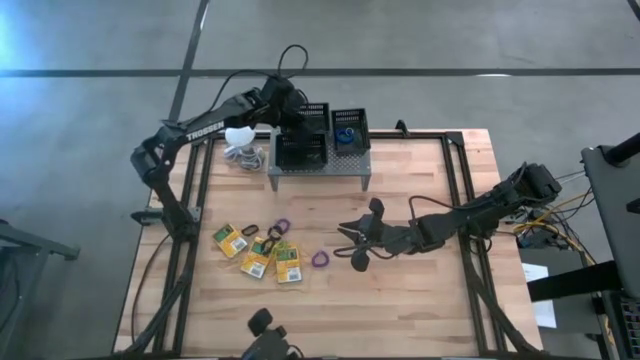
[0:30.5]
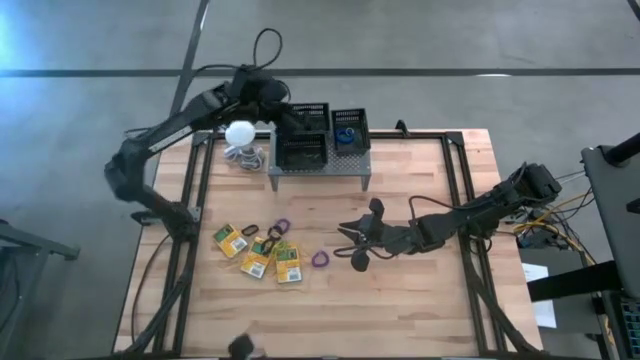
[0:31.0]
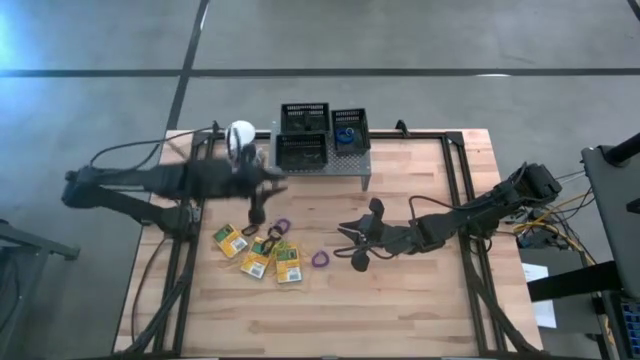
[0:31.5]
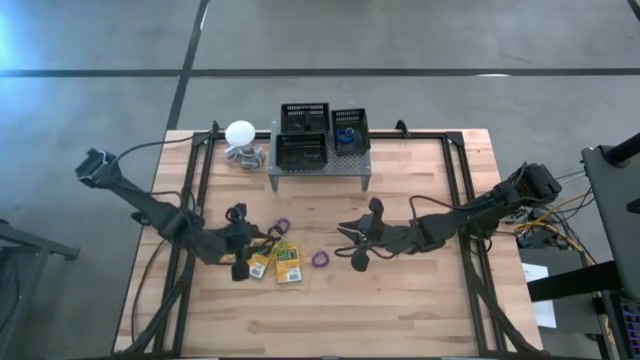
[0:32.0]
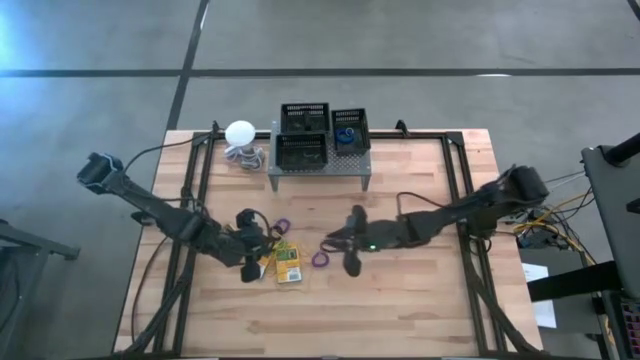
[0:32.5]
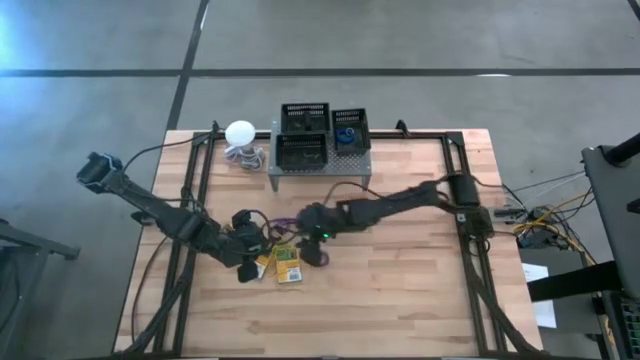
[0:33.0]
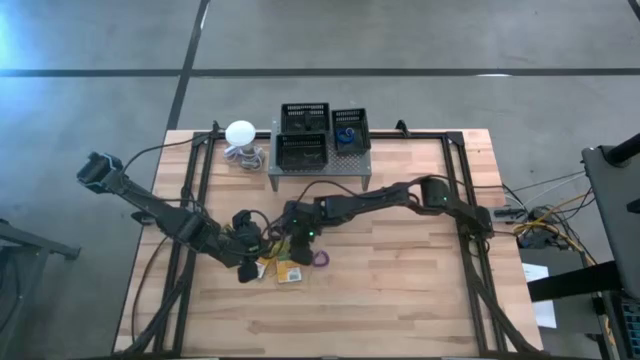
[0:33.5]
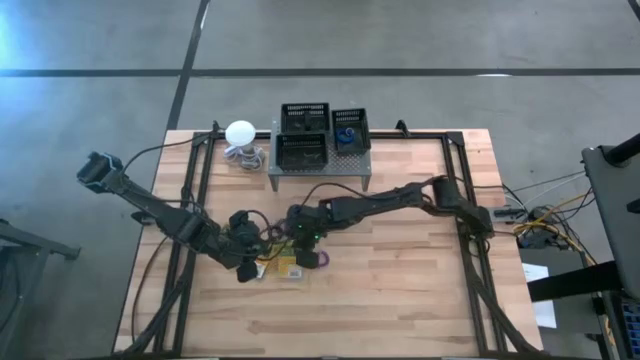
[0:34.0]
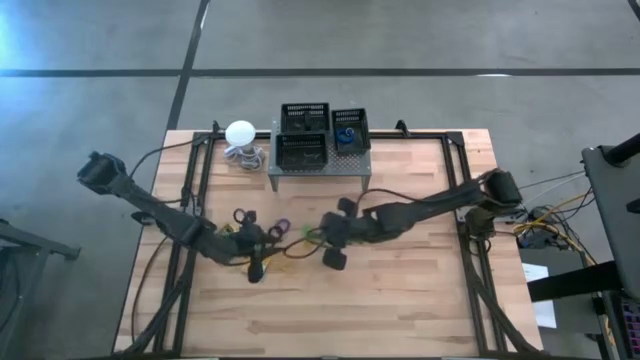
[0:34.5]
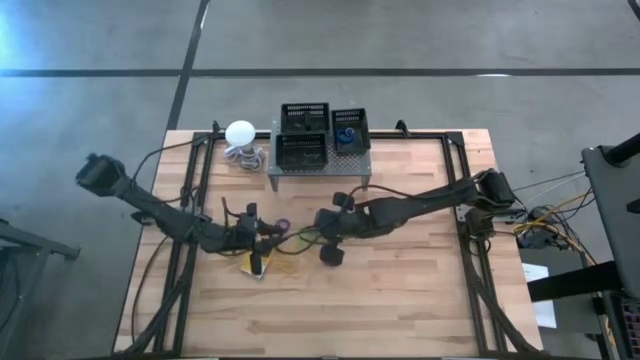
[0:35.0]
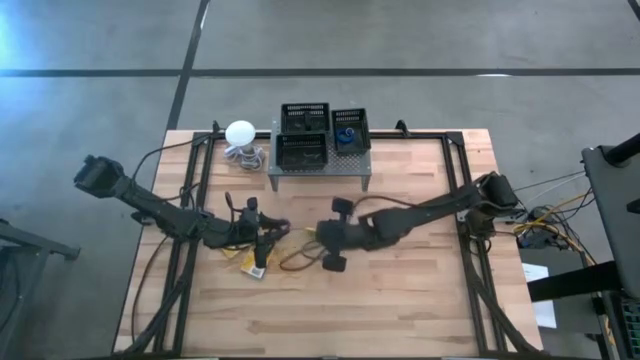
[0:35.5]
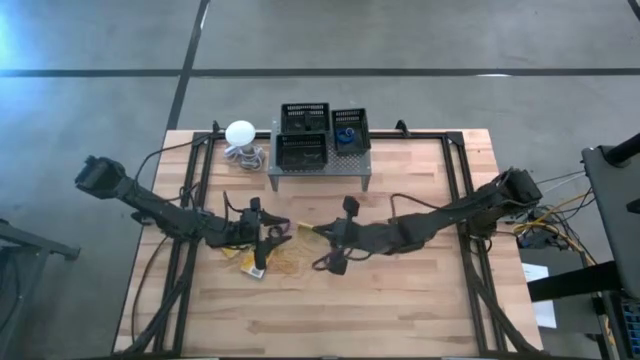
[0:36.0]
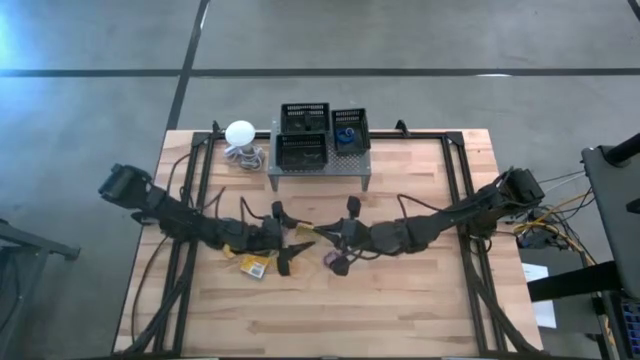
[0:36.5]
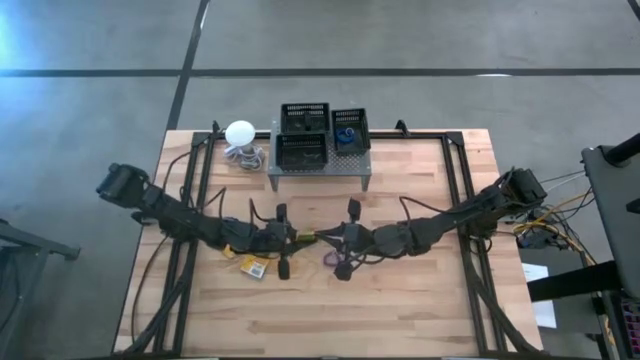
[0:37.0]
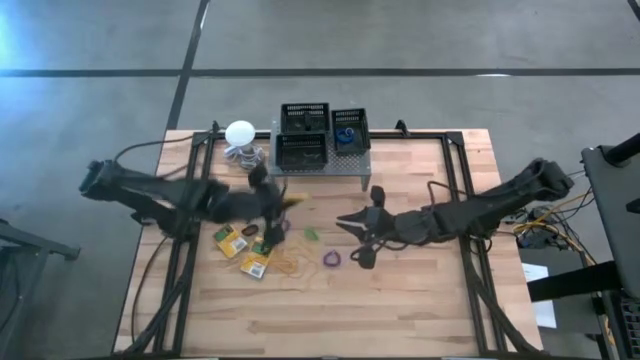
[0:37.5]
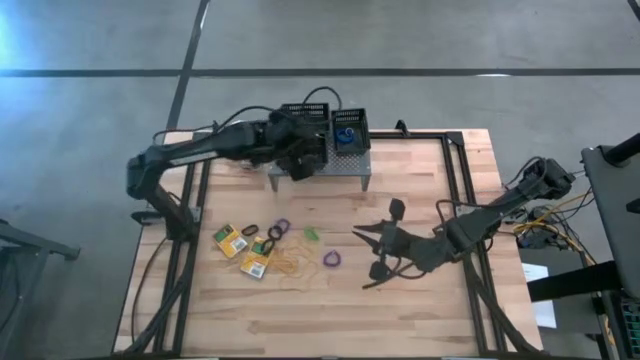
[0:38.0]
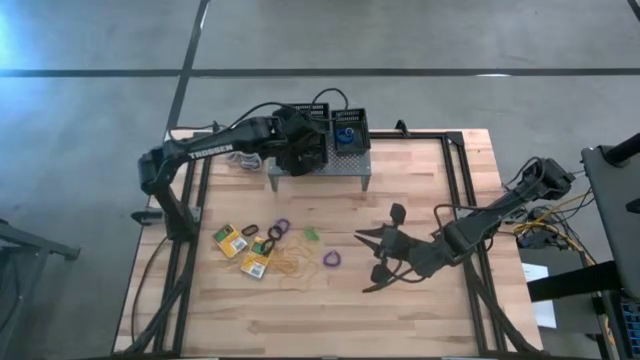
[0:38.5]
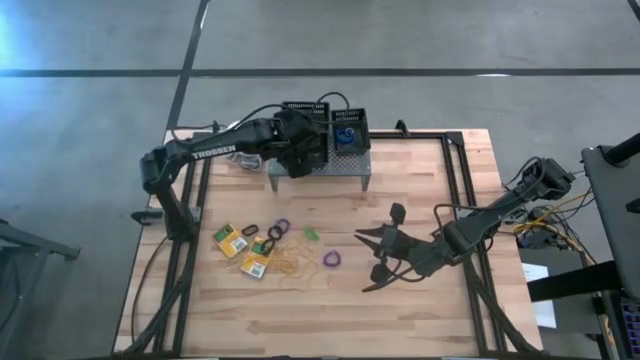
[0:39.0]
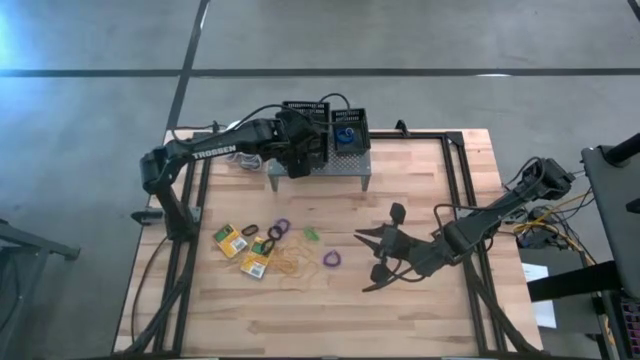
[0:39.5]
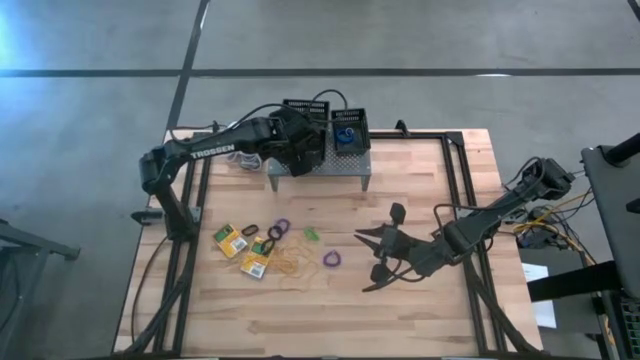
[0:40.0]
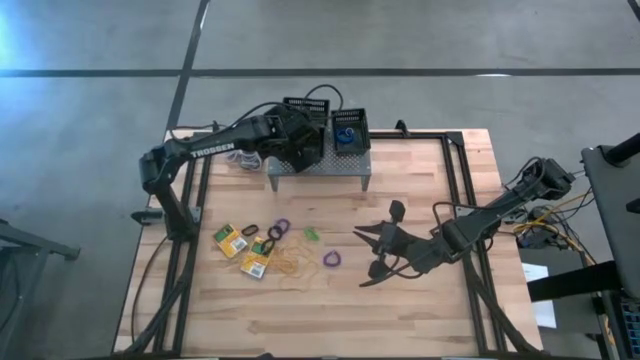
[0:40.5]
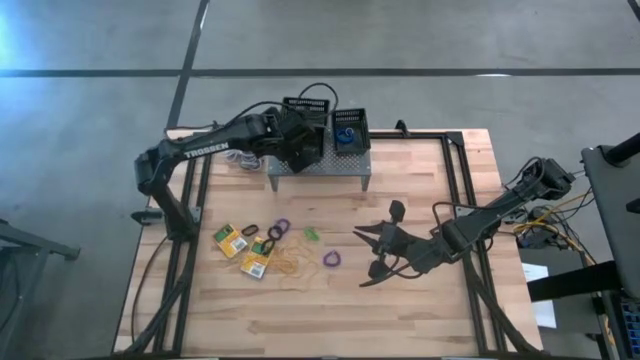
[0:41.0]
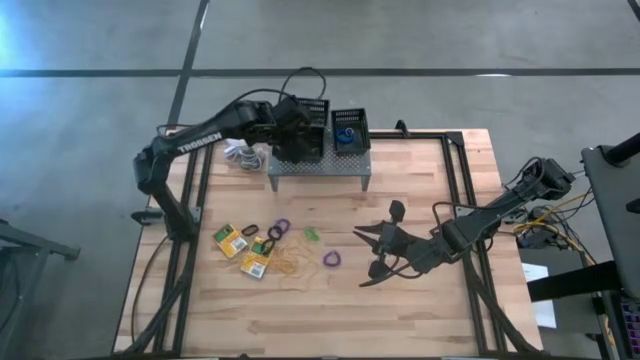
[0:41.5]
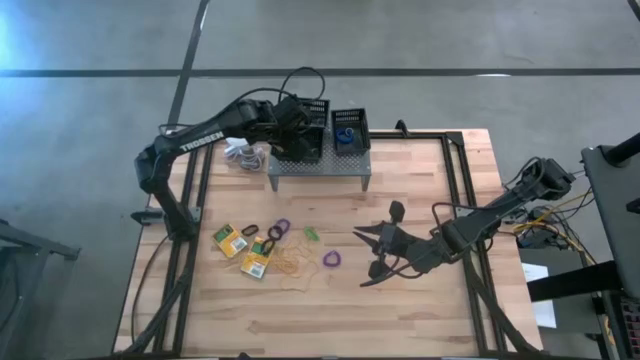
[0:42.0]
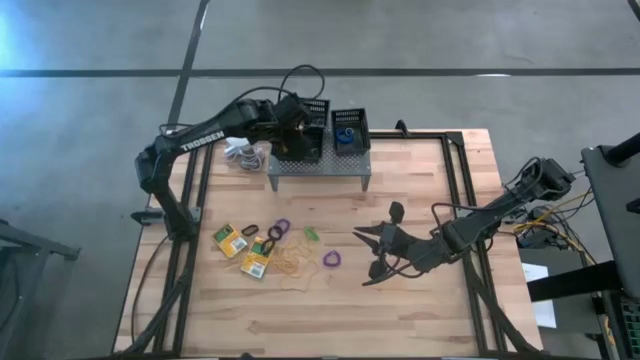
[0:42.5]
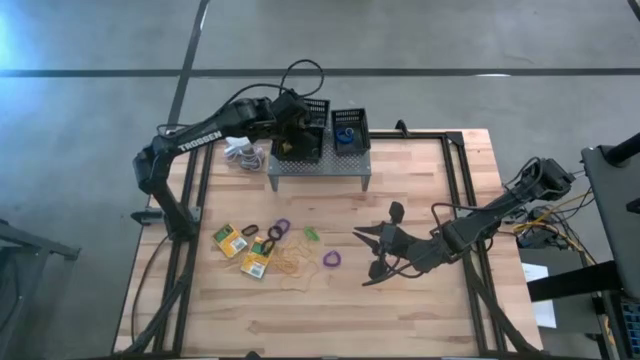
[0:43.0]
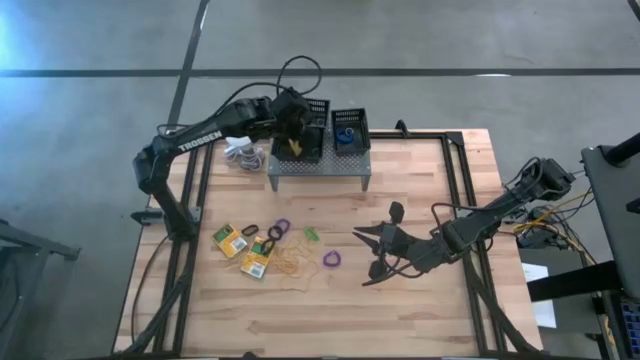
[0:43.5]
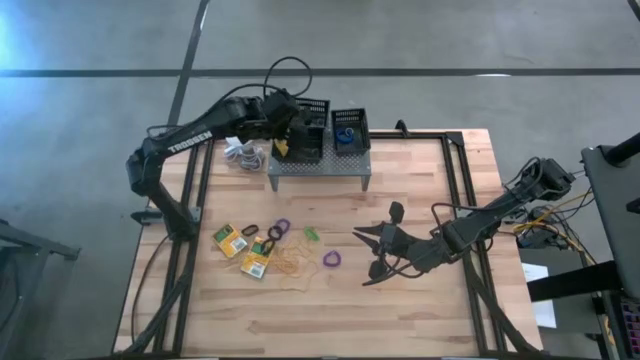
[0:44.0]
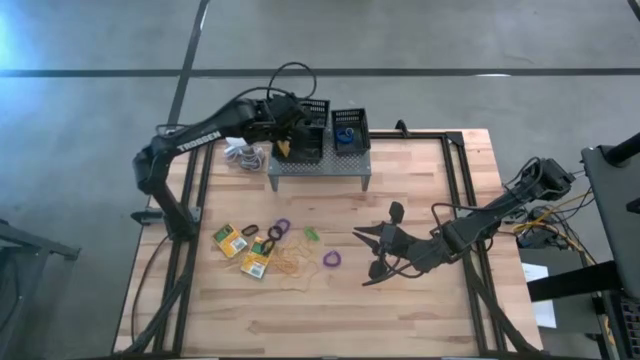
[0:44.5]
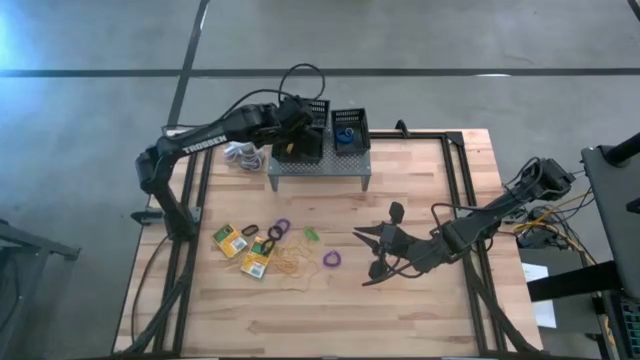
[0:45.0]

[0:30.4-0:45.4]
Task: Pick & Place Office Desk Supplies
Put the right box of crayons into the bottom left black bin on the shelf

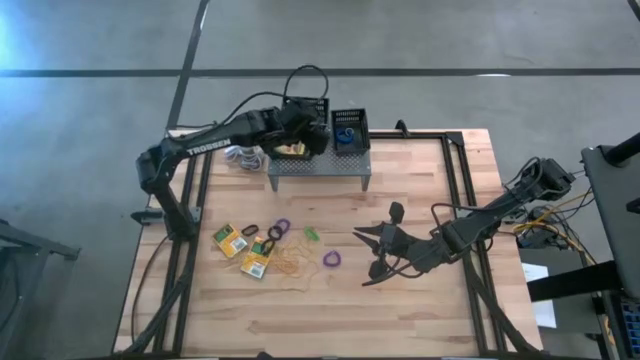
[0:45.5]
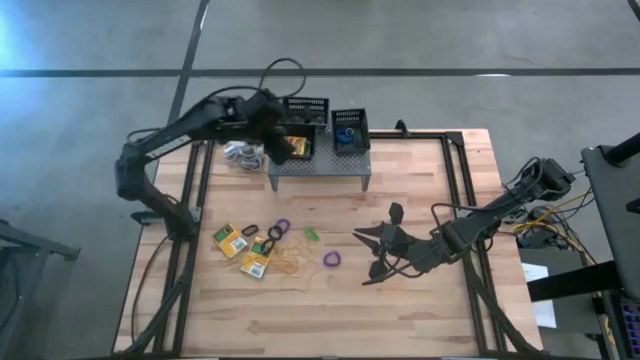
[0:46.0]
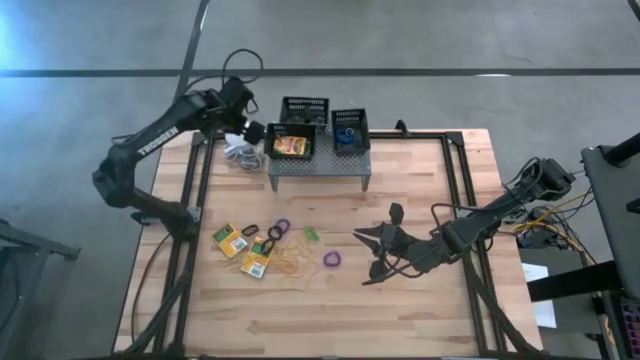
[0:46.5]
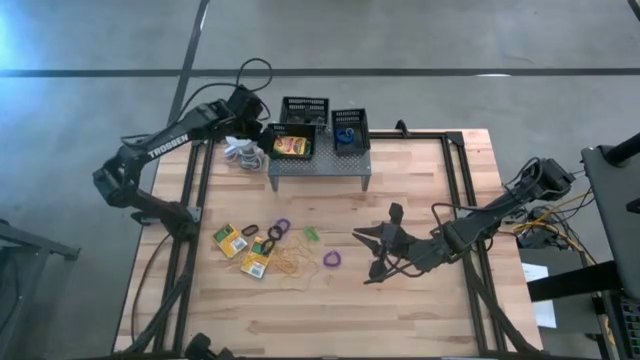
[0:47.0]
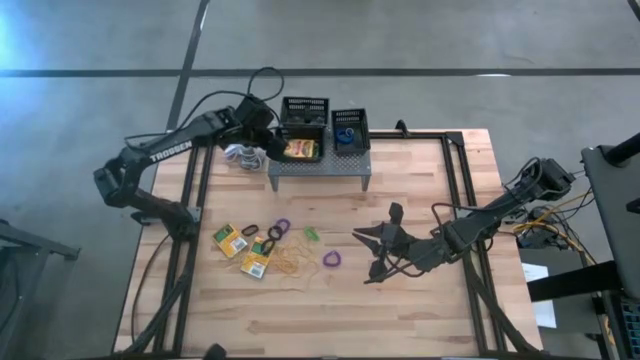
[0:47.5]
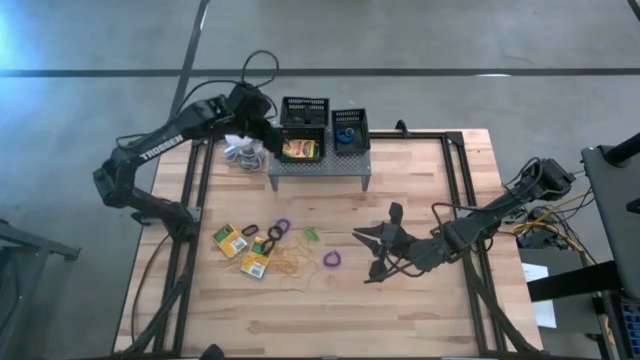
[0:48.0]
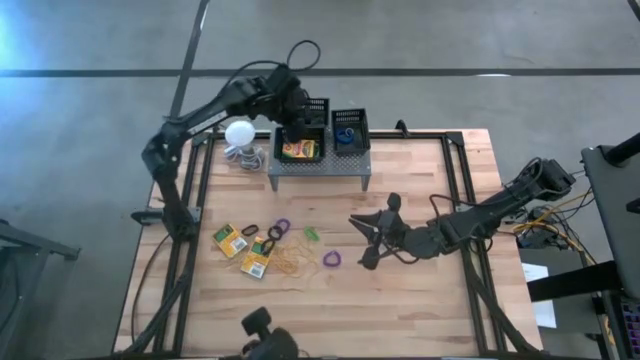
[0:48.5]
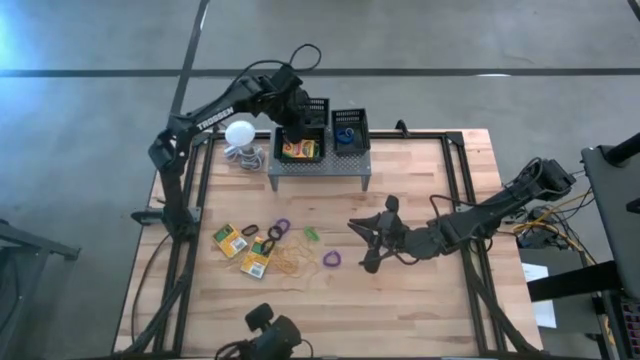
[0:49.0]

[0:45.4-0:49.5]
Adjust the black bins

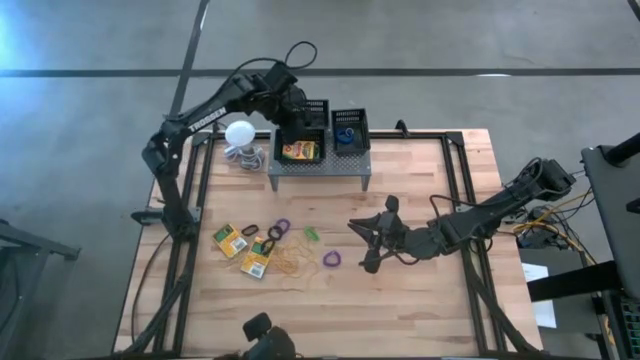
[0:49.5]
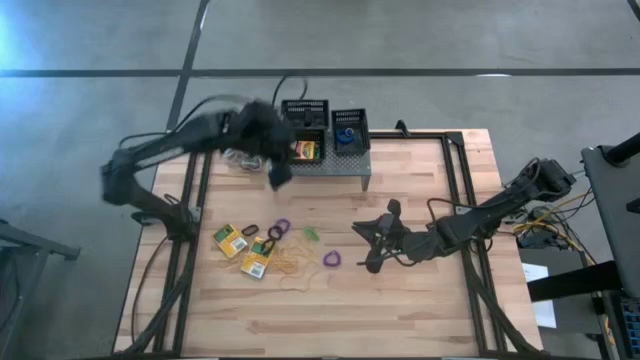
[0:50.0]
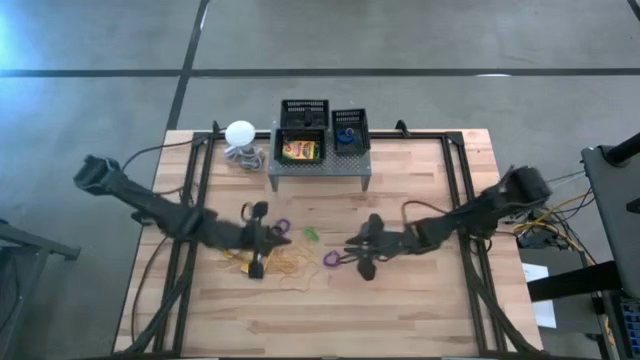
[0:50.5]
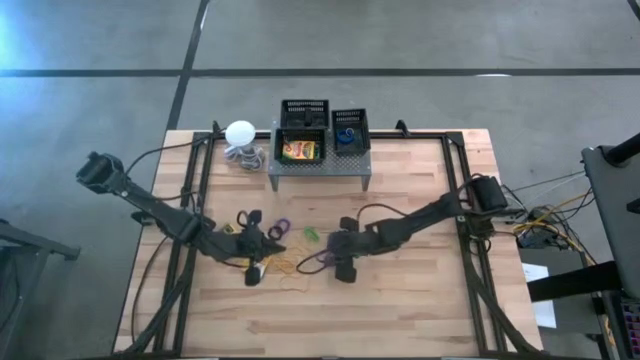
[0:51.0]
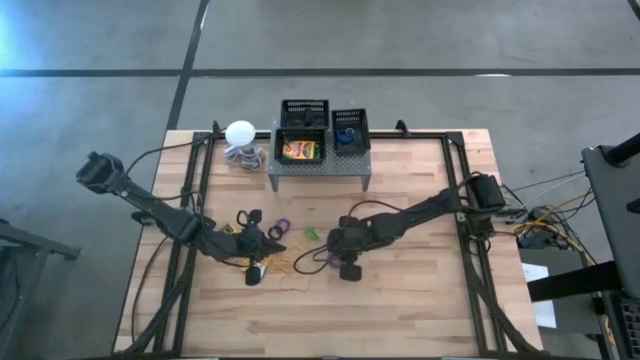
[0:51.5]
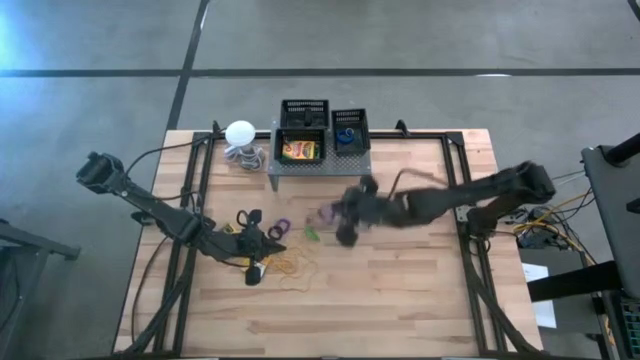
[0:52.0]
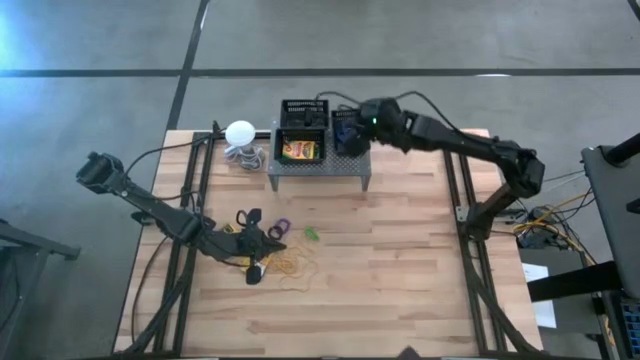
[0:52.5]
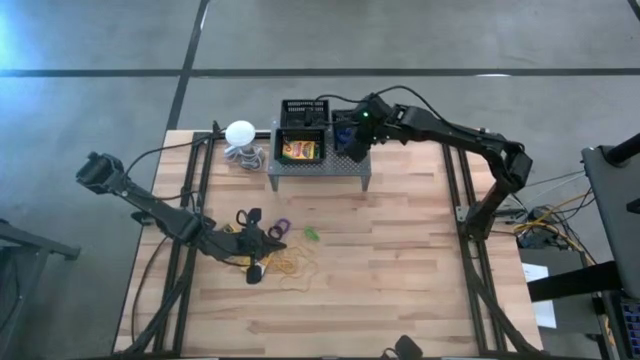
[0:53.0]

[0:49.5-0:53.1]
Put the right purple spring keychain into the right black bin on the shelf
